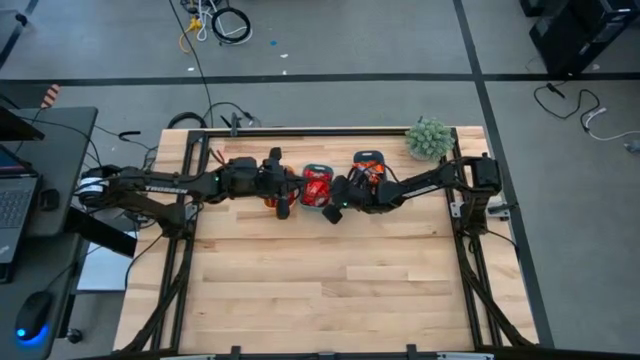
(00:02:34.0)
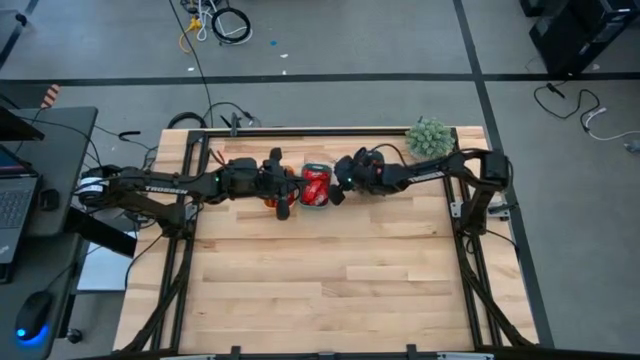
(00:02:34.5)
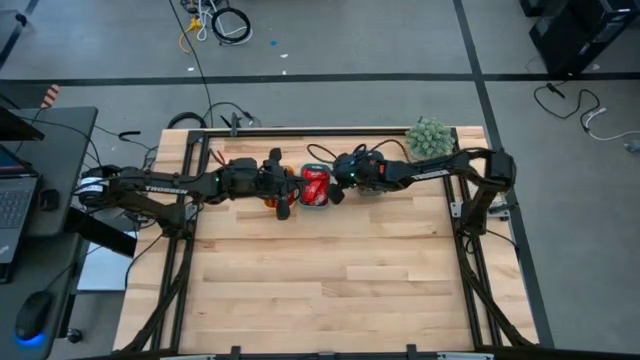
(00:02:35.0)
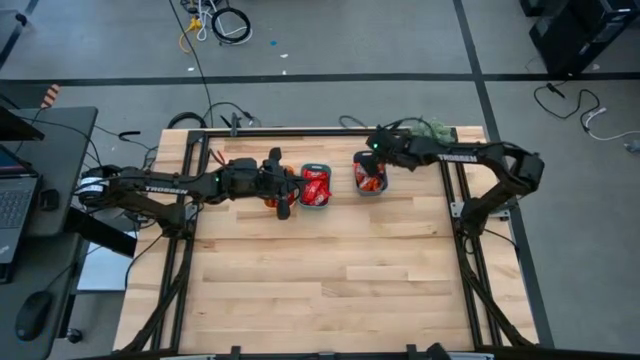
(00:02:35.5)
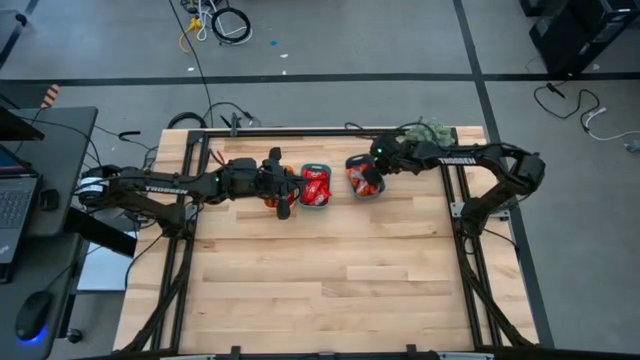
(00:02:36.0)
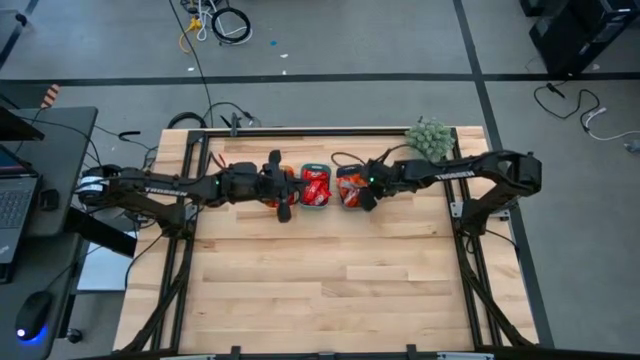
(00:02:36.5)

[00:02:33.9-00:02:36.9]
Task: Sort candy
Adjust the blue bin

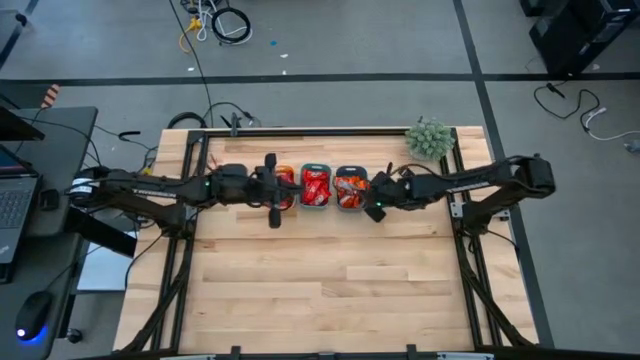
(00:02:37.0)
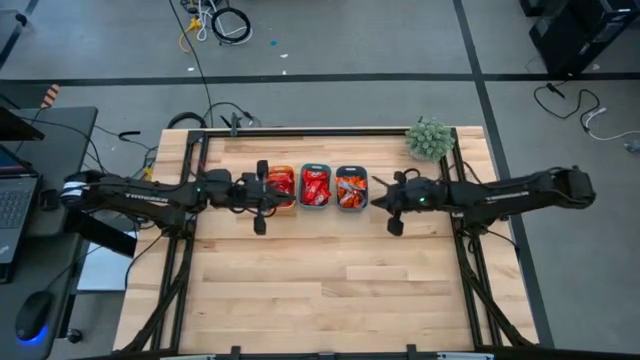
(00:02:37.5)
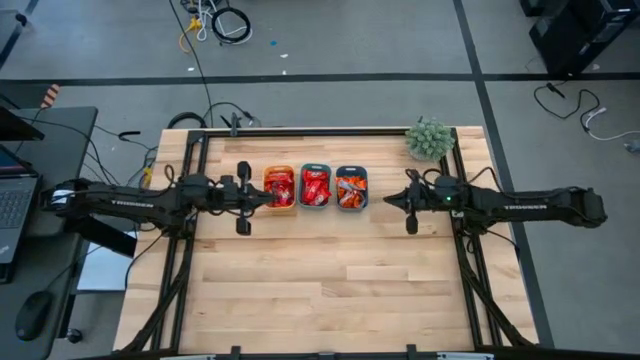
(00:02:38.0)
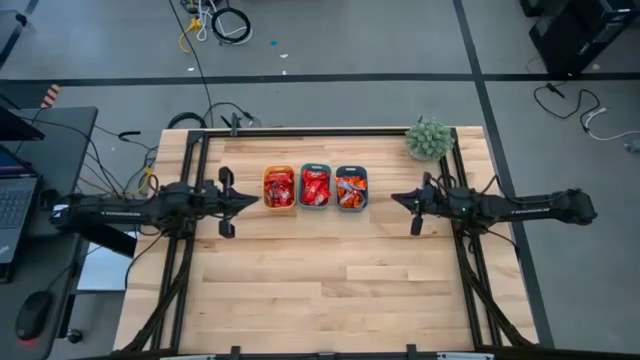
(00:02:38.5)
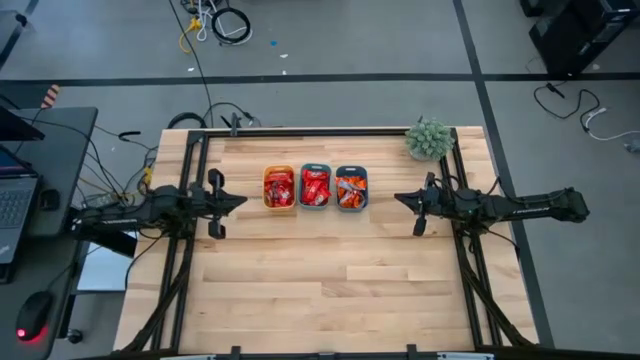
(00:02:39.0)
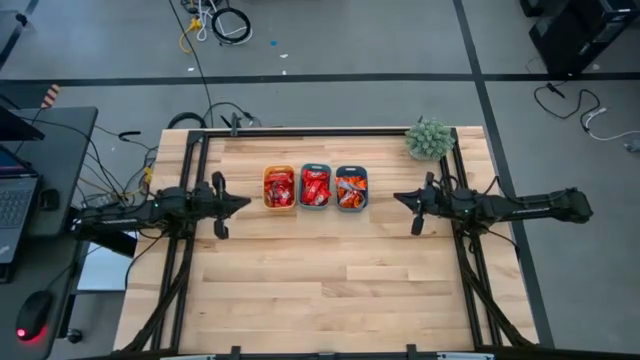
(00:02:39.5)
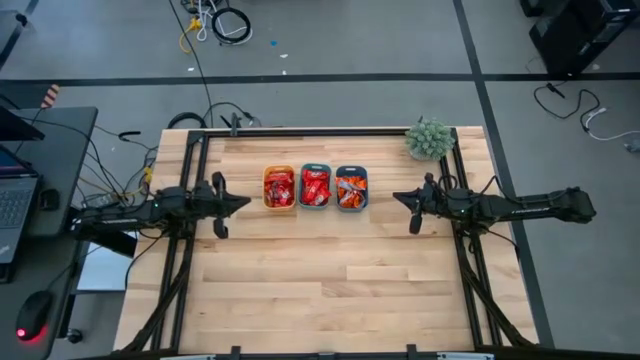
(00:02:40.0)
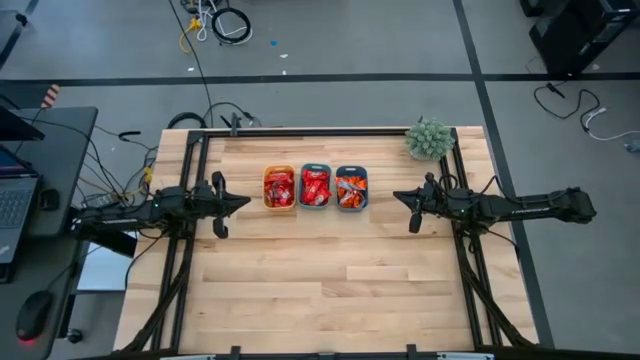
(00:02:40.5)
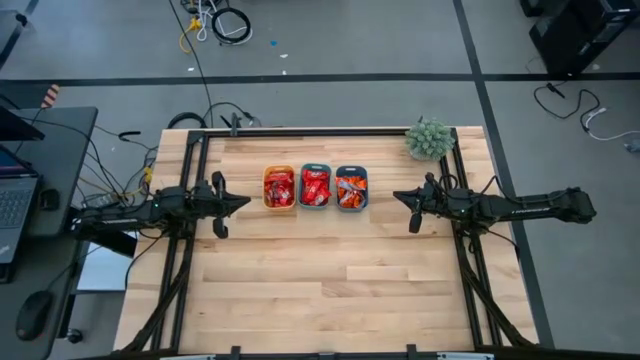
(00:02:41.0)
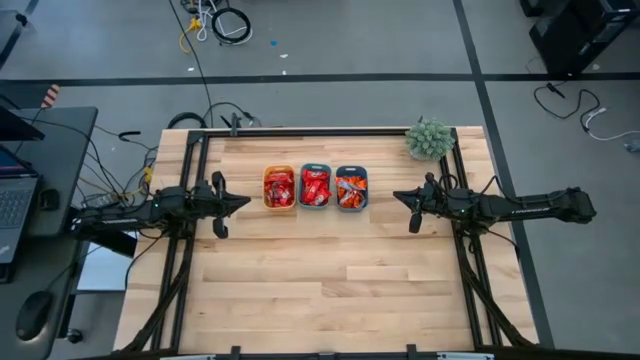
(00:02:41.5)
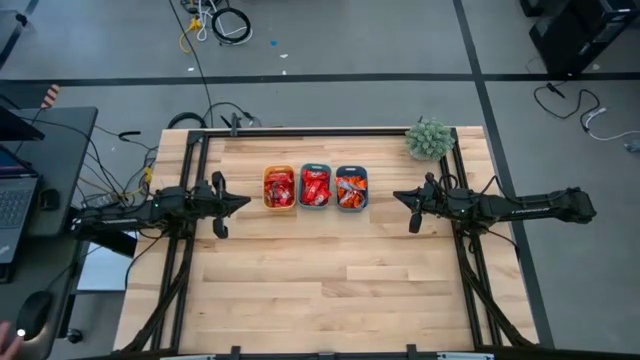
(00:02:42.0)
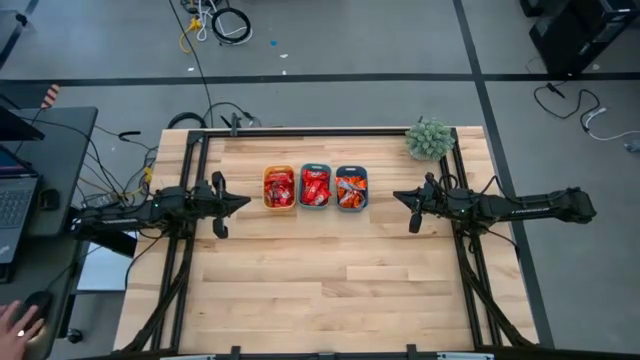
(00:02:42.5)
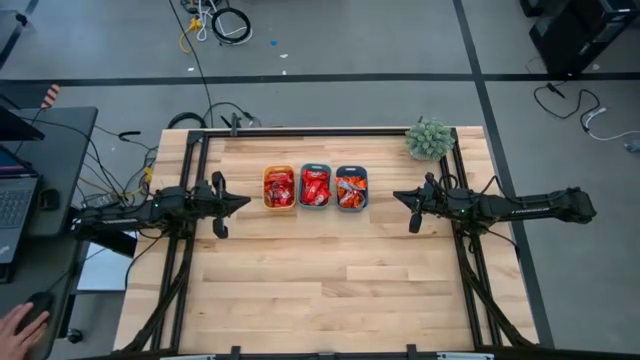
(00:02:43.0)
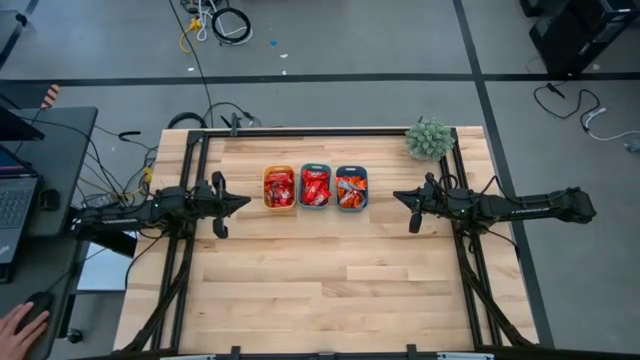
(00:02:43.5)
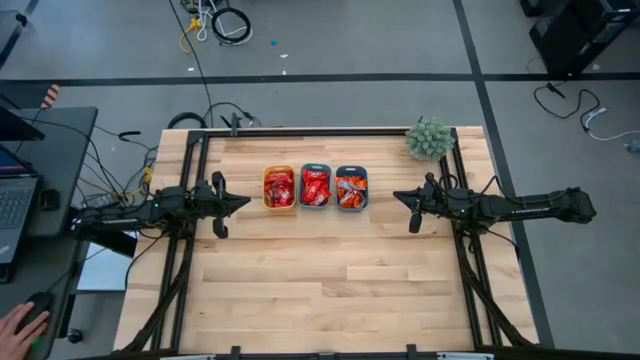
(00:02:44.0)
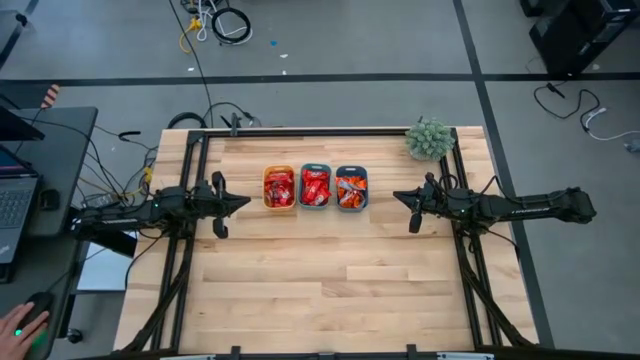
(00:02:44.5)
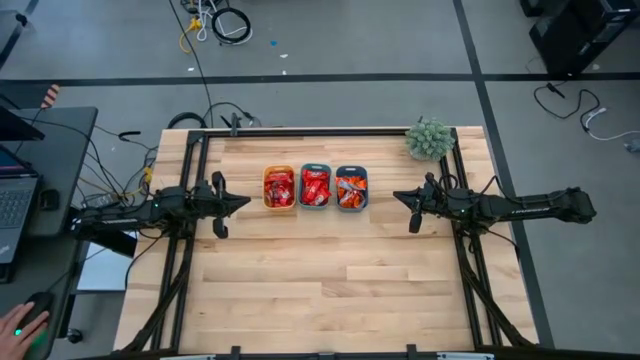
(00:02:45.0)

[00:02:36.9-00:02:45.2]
Return to Home Position

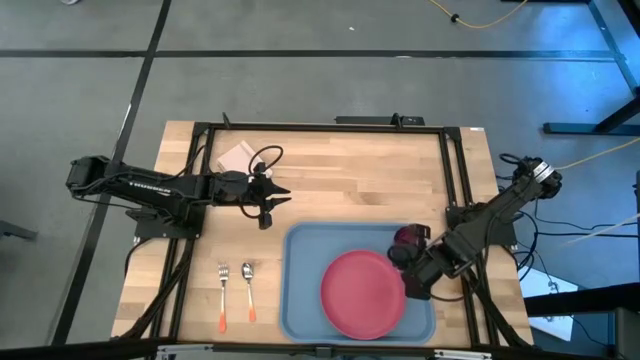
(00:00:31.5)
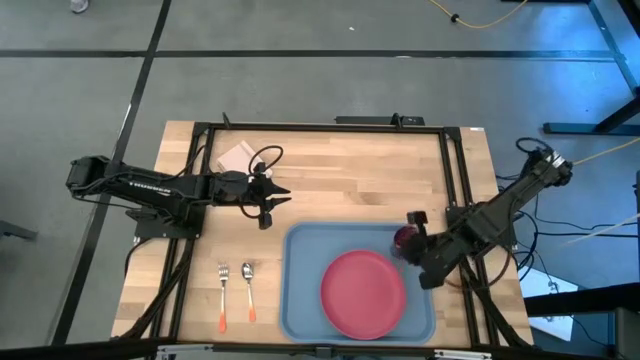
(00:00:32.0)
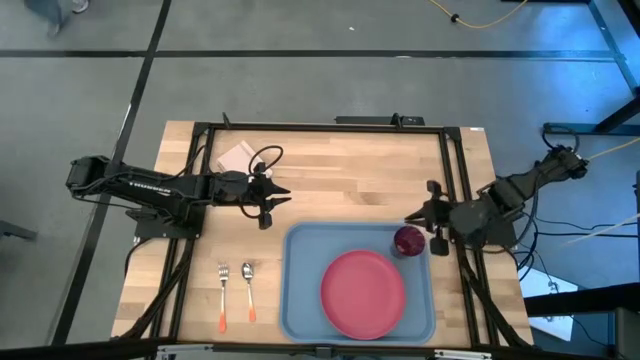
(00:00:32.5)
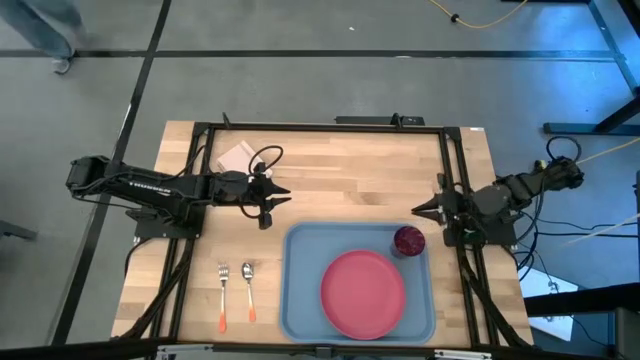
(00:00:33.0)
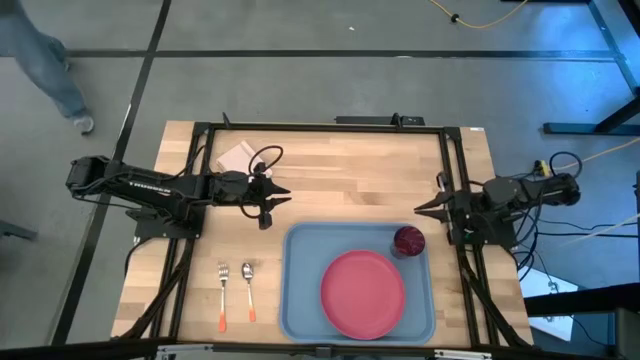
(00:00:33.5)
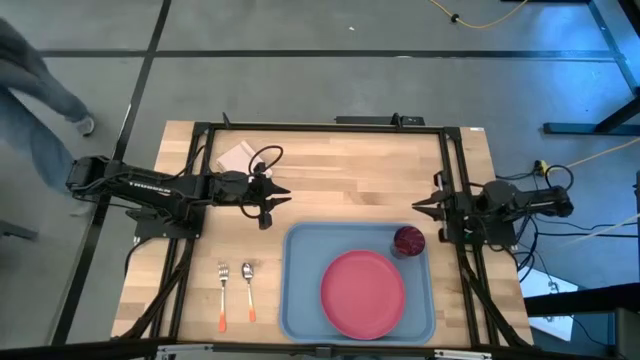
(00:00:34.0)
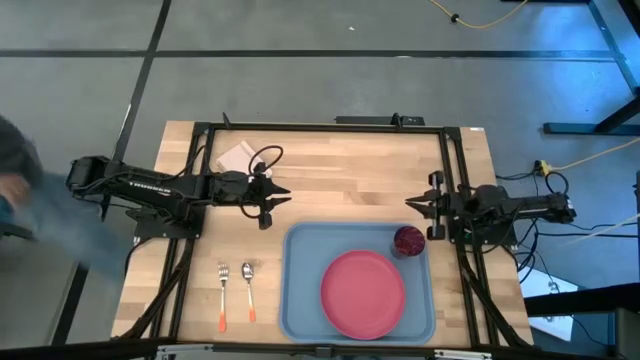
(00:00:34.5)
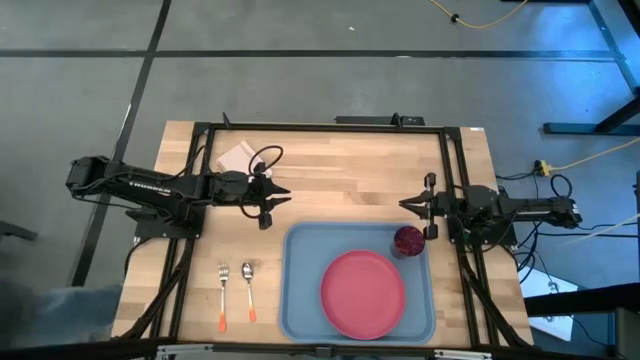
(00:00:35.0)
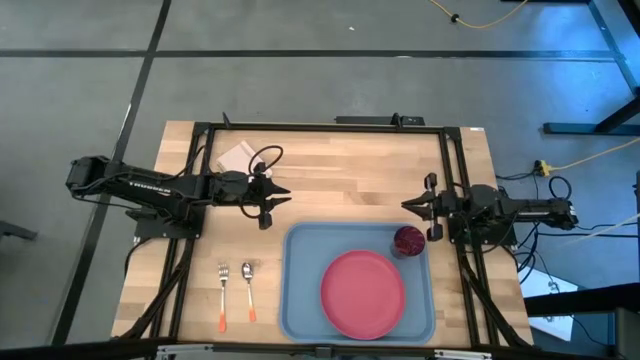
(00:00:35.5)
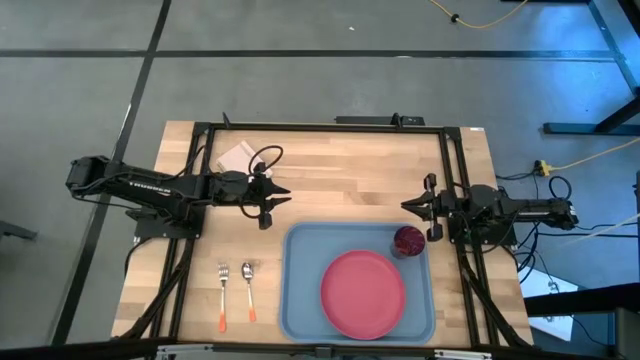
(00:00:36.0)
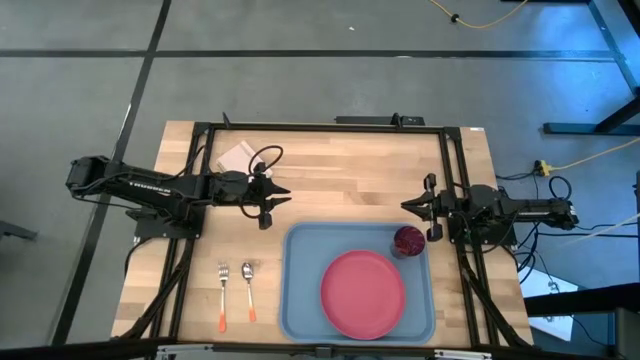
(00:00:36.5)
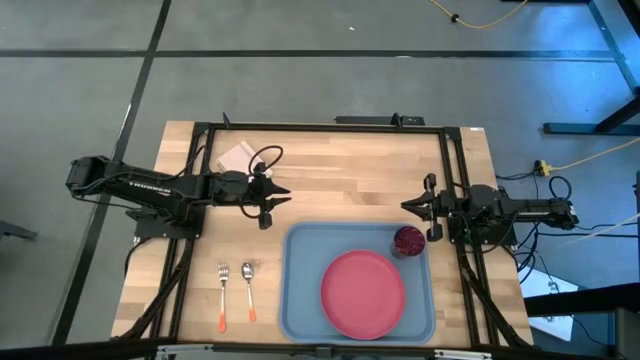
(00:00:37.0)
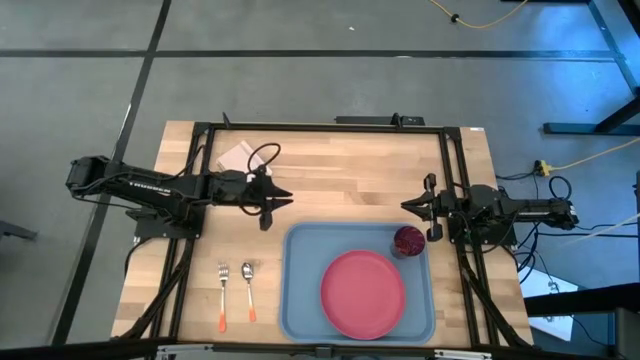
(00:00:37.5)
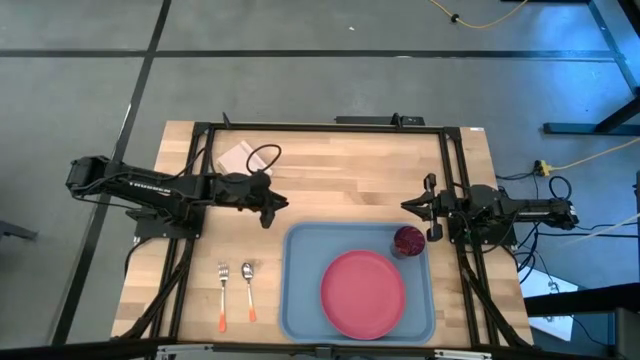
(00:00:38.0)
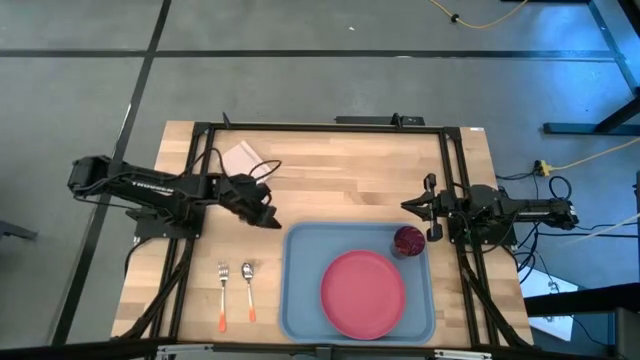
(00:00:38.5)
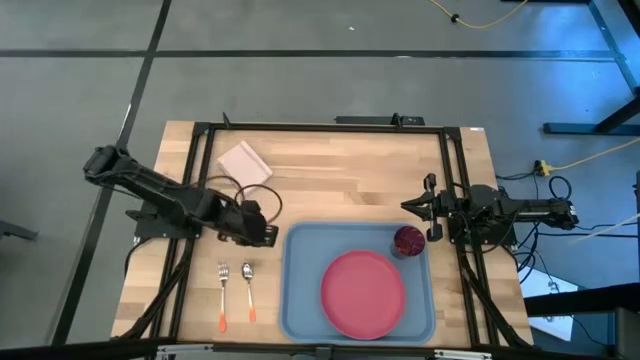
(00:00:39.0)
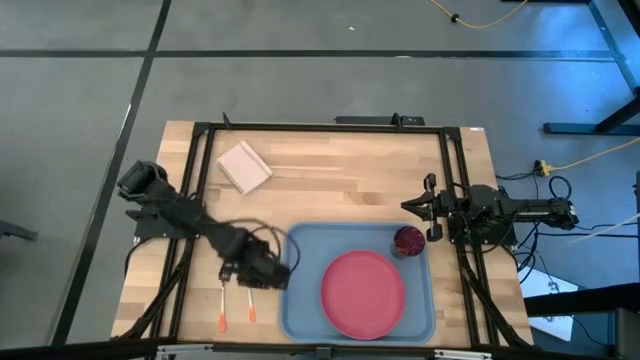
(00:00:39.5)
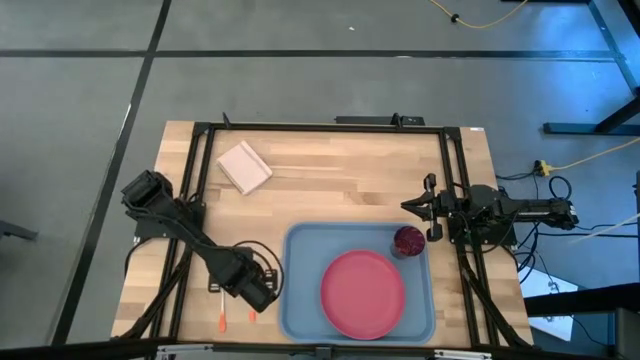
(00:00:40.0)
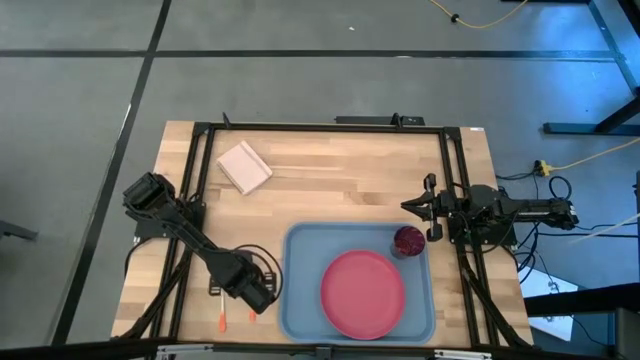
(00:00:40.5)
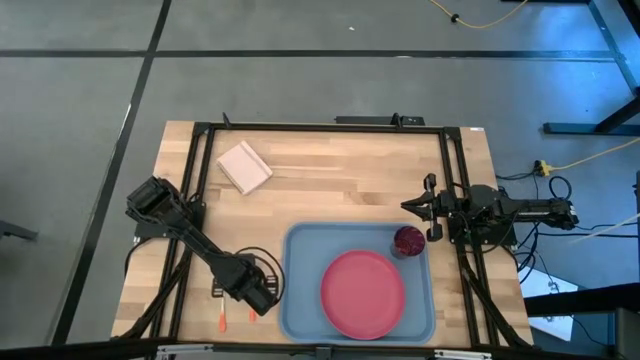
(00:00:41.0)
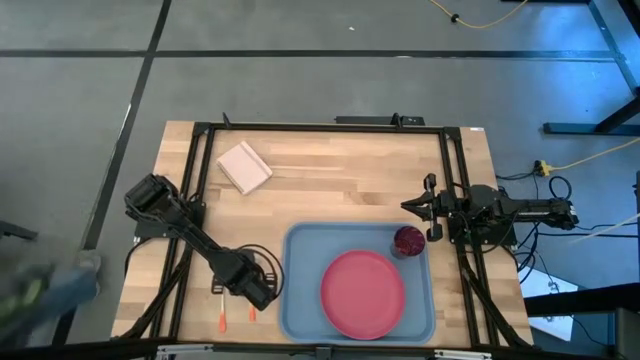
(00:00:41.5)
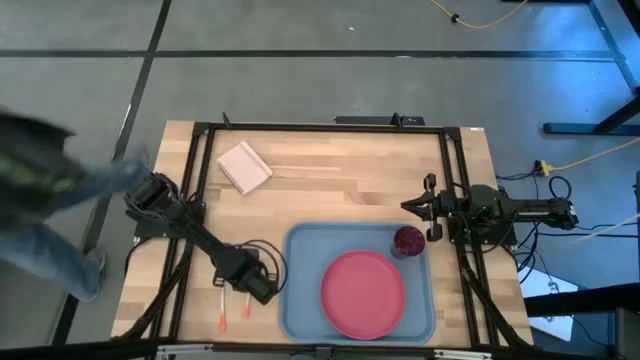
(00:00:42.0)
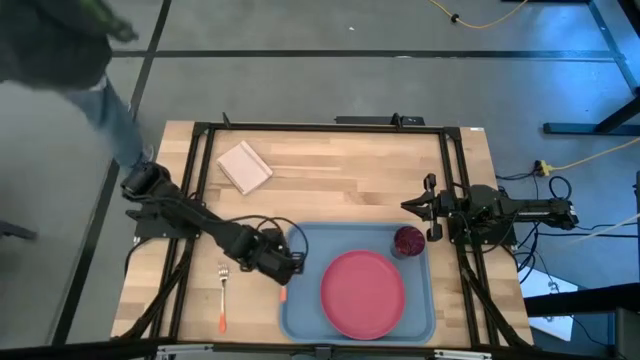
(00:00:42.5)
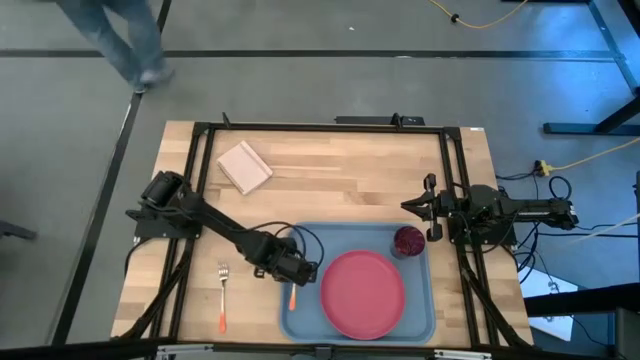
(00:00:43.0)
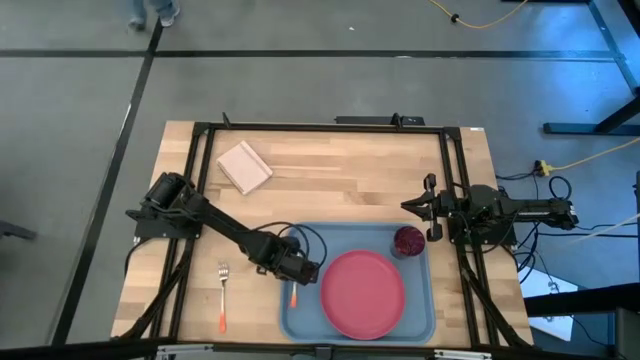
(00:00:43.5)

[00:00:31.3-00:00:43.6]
Task: Pick and place plate/cup/fork/spoon on tray
Put the orange spoon on the serving tray to left of the pink plate
